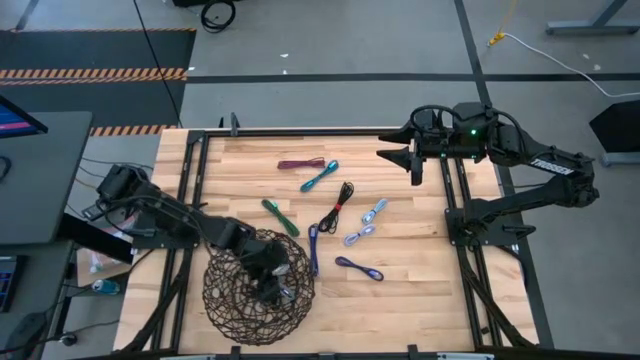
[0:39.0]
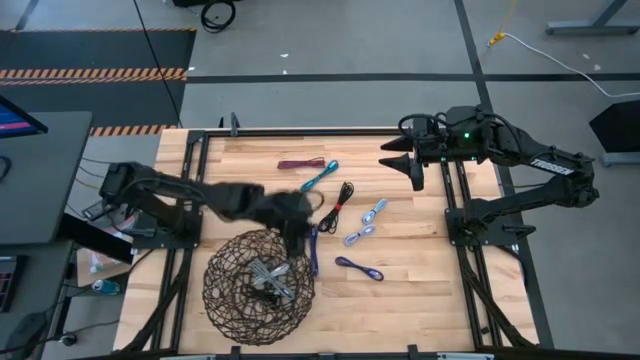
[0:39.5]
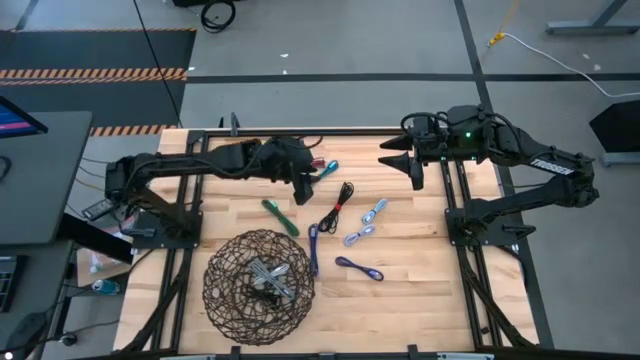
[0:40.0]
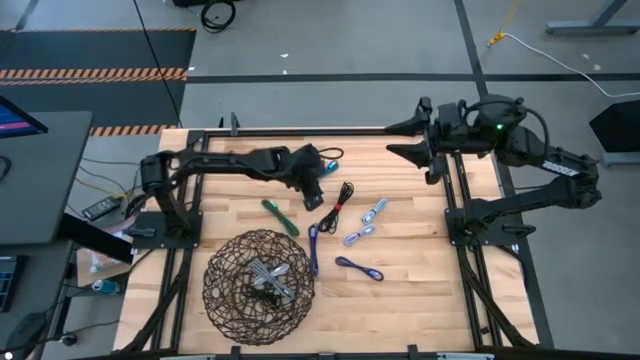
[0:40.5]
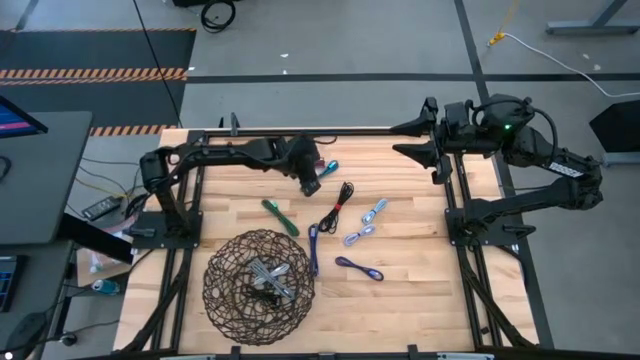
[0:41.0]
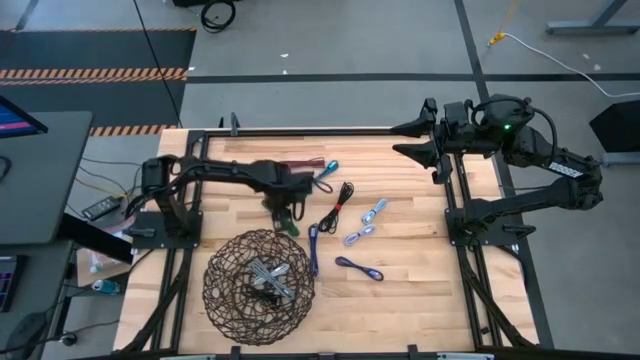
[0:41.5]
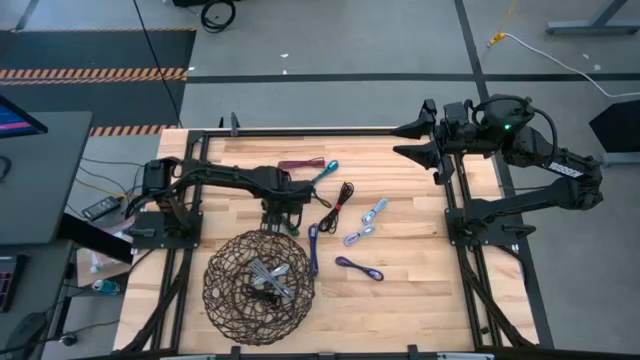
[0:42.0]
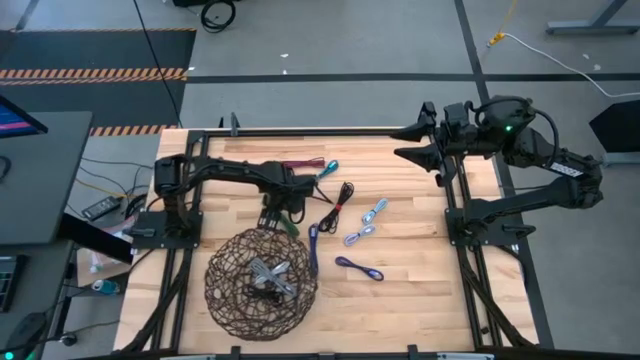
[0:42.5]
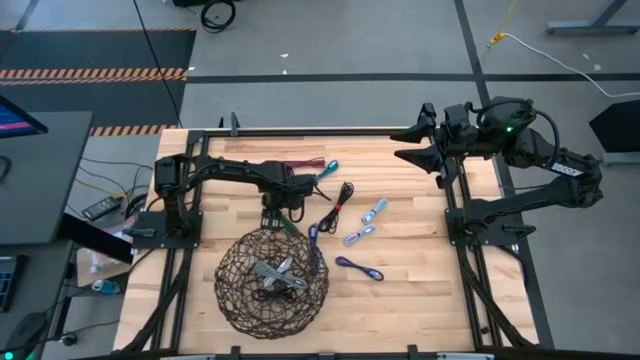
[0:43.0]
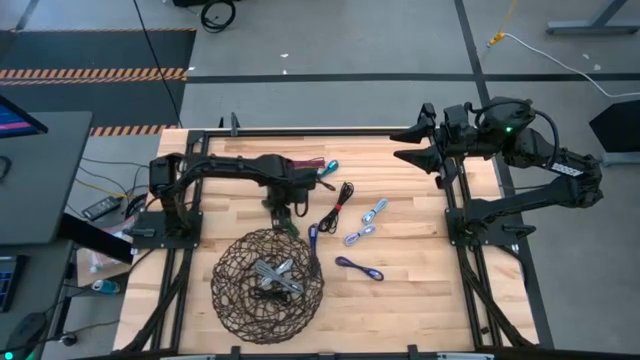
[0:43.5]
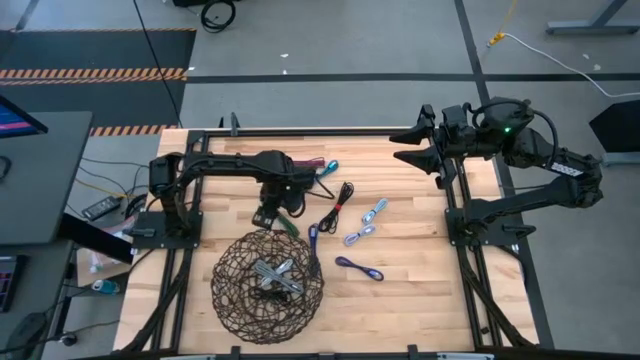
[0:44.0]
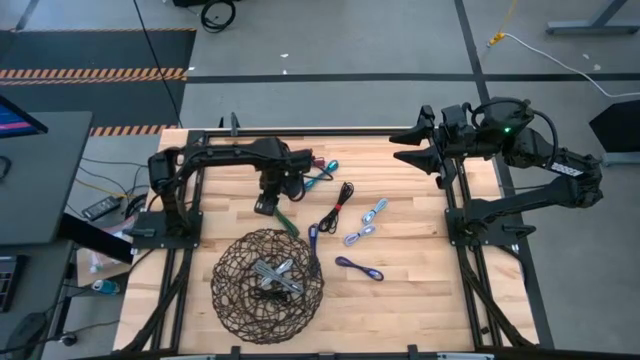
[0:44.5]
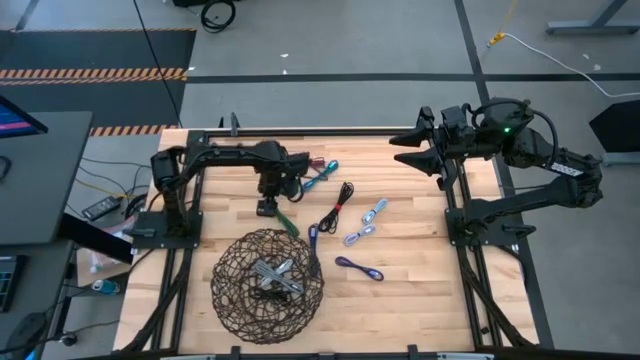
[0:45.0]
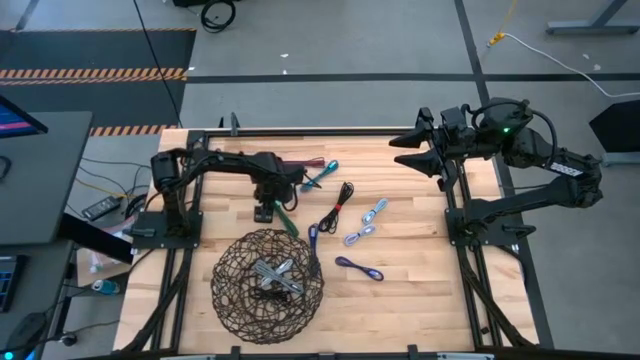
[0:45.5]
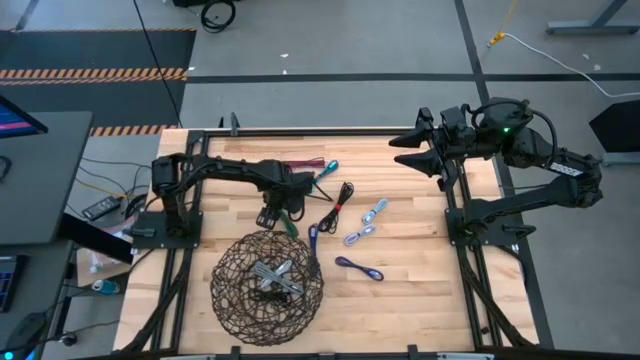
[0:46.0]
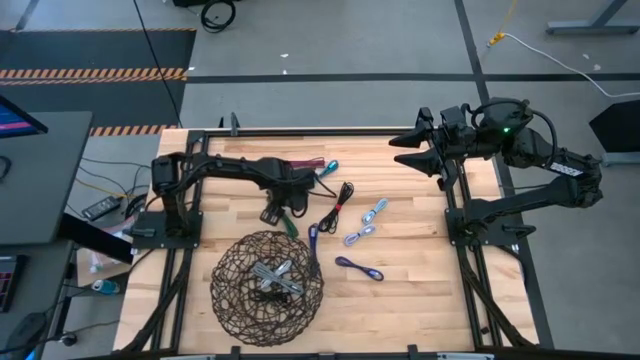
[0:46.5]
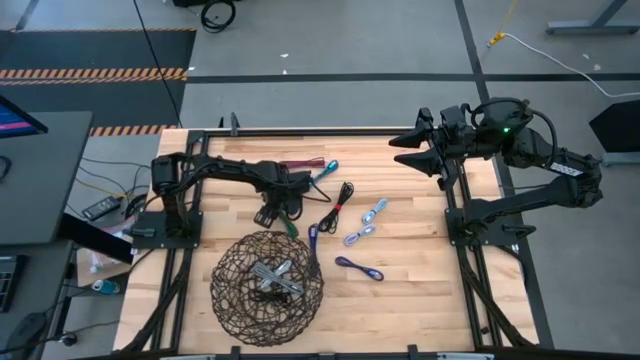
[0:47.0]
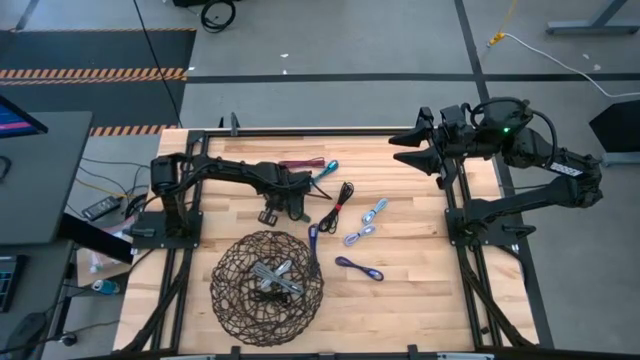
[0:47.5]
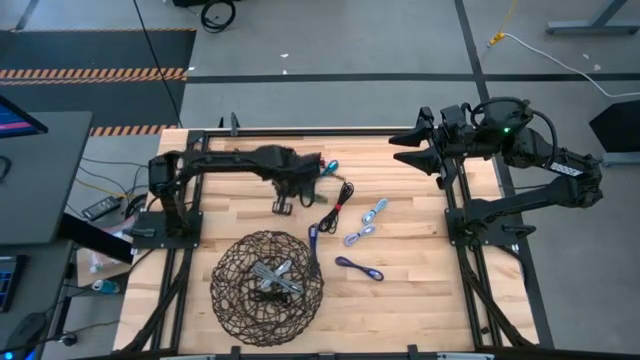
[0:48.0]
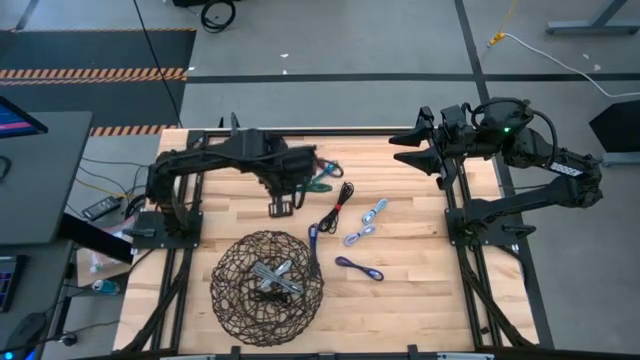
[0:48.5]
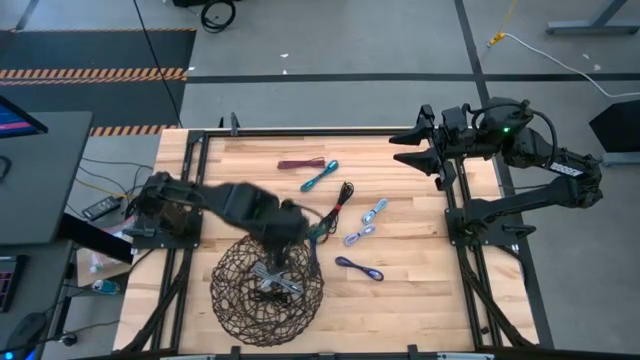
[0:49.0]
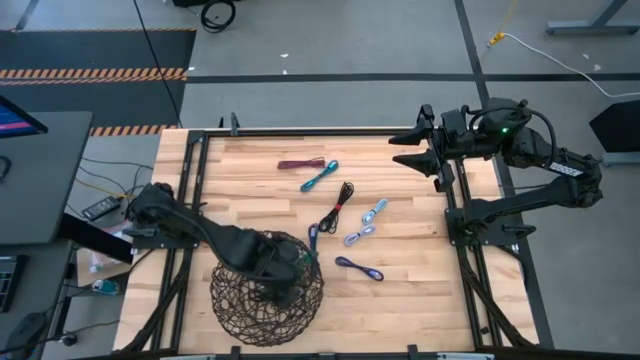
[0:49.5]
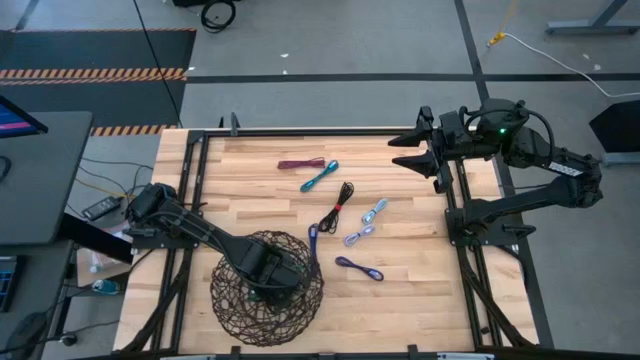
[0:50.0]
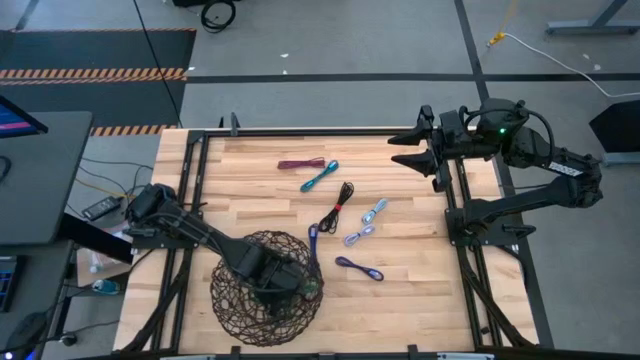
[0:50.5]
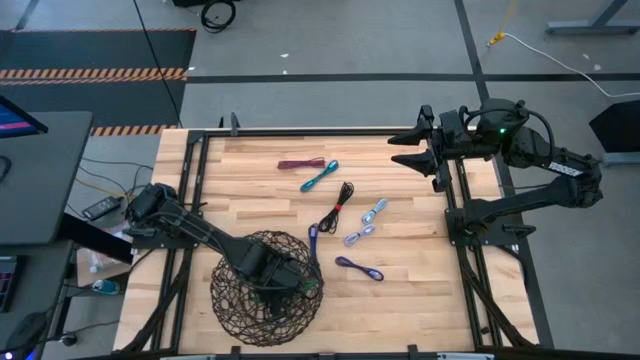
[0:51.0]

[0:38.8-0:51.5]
Task: Pick and place USB-C Cables
Put the green charger cable into the wire basket

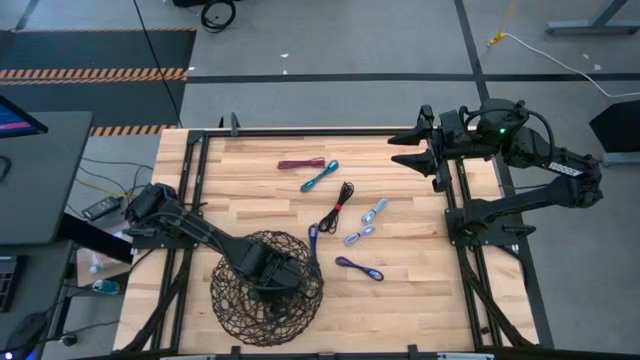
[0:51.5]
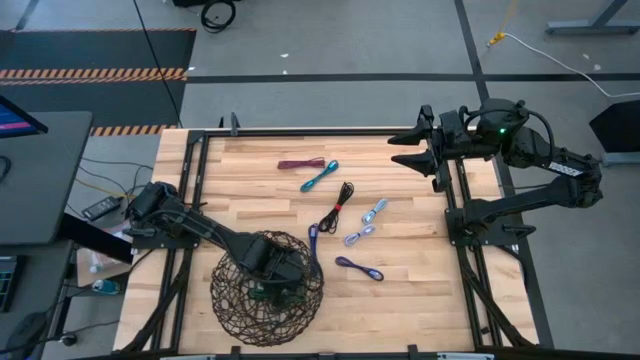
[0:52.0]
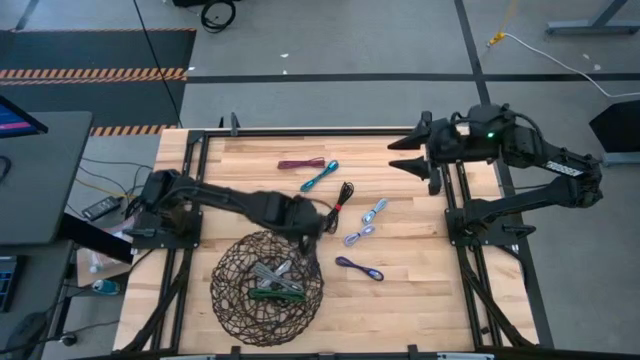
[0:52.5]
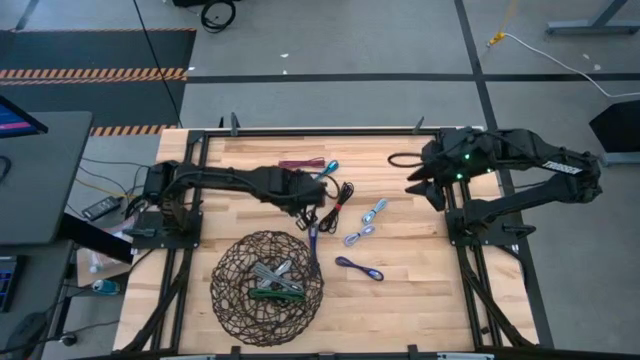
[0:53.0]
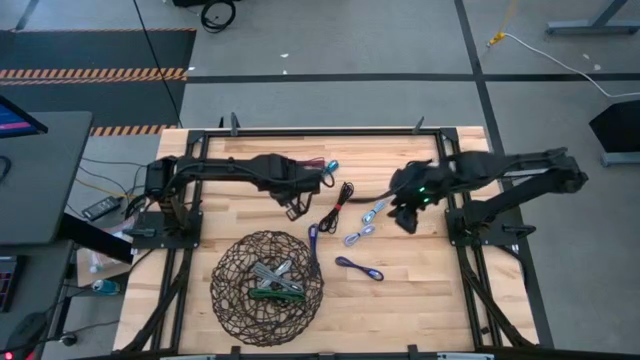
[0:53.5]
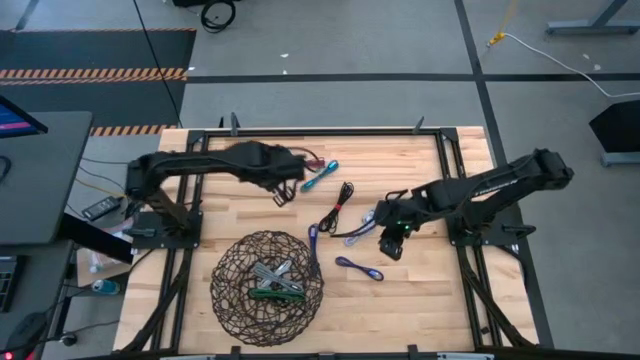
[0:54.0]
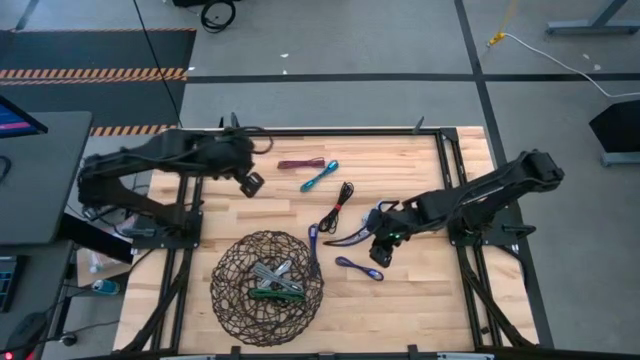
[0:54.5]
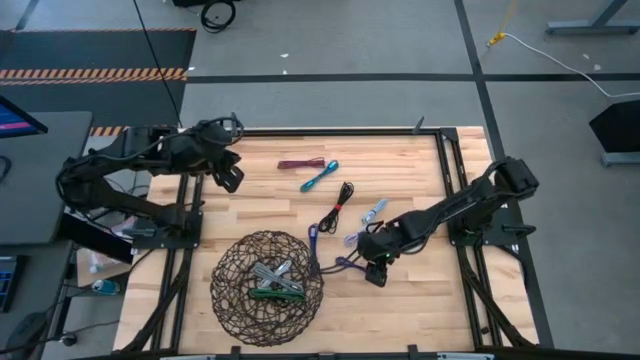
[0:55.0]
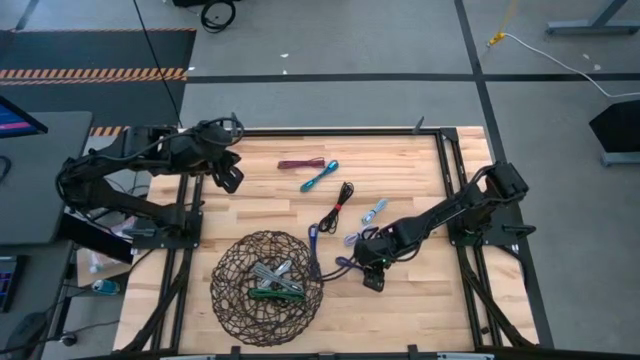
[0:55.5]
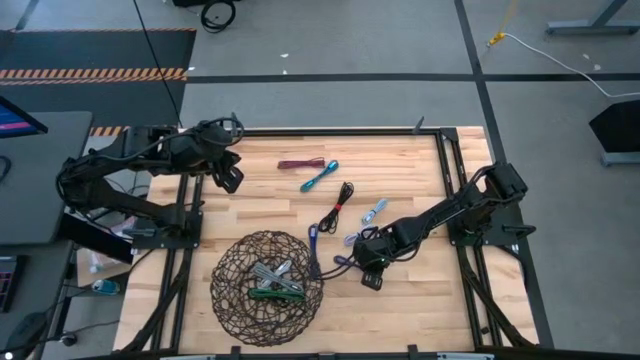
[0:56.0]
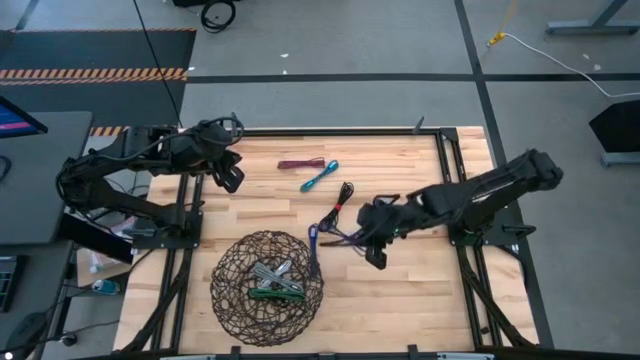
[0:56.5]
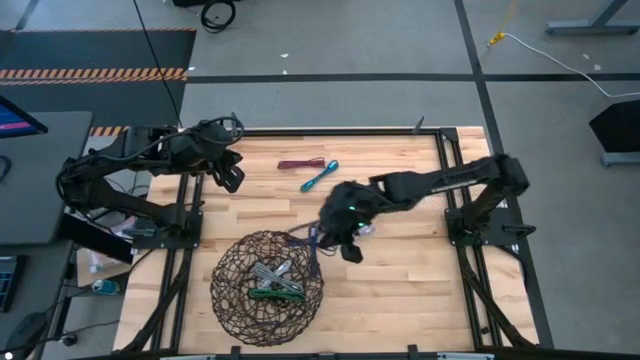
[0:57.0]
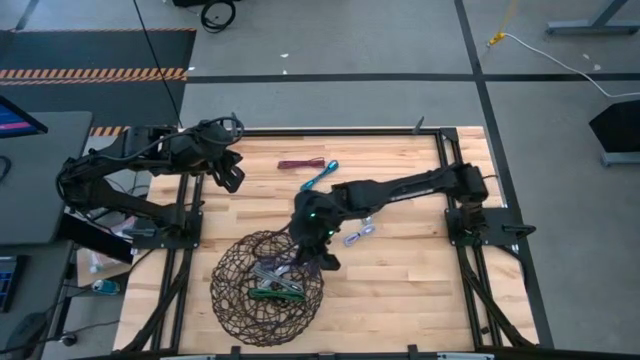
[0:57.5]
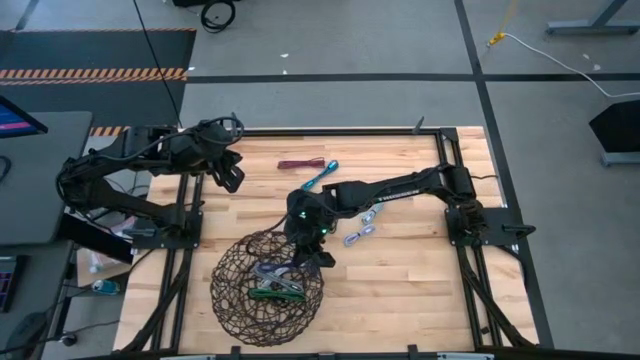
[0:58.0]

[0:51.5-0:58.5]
Put the right violet charger cable into the wire basket

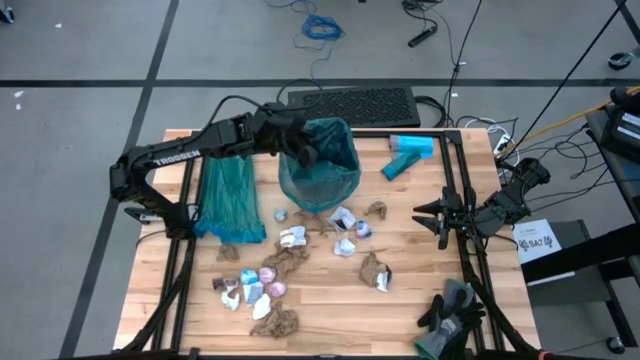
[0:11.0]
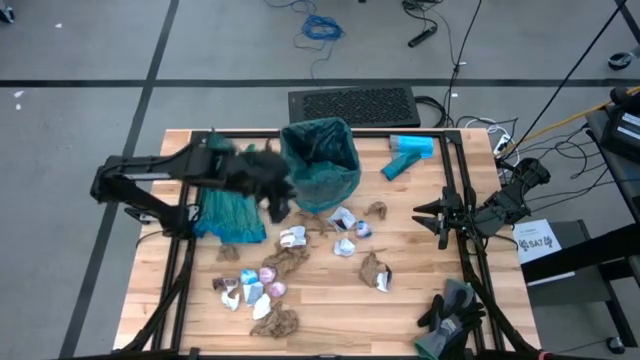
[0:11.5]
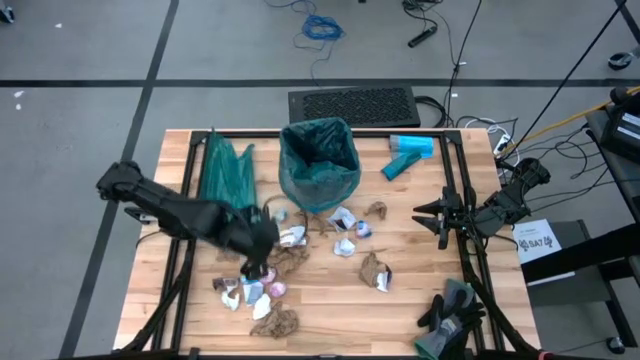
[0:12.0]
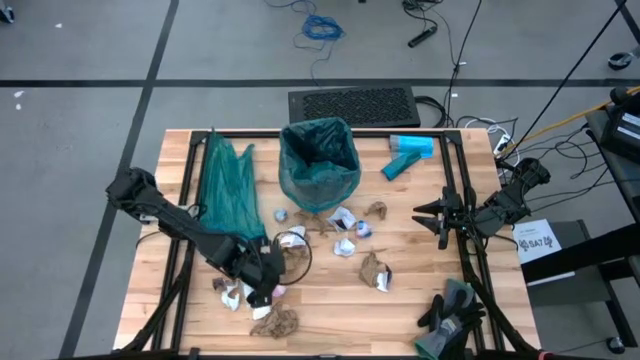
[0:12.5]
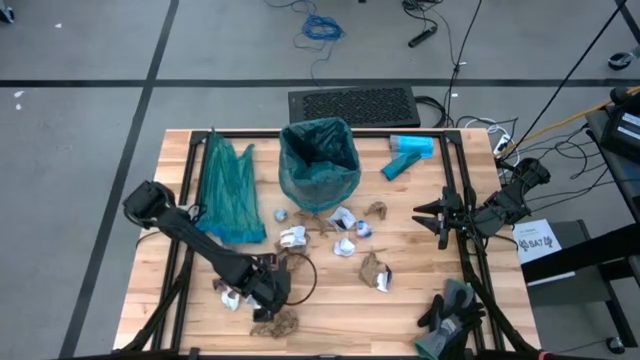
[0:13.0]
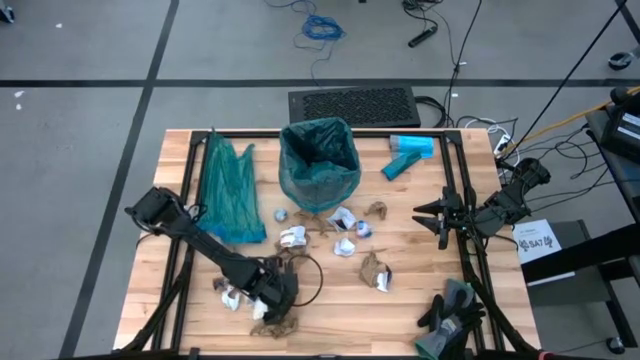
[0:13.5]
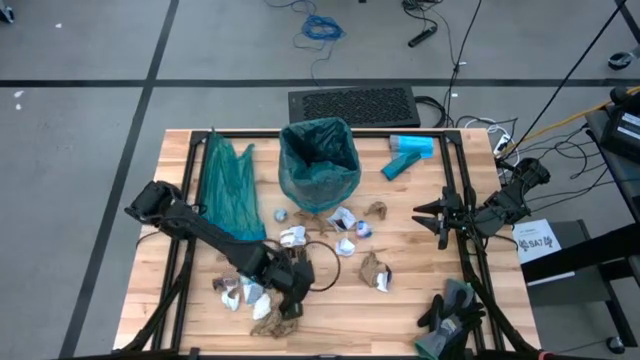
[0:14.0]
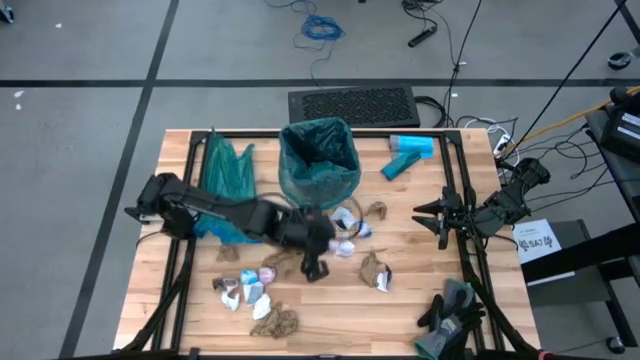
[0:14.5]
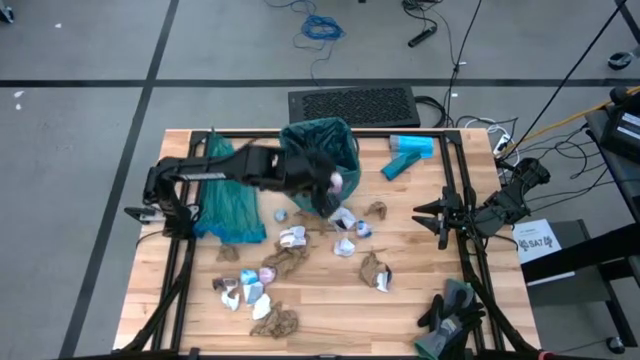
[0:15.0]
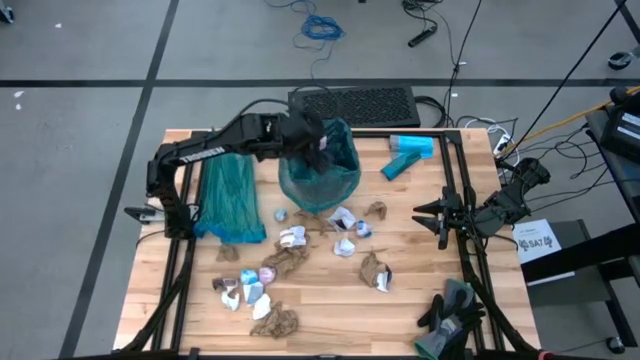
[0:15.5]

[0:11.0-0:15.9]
Task: place trash/remove bag and relplace
Put the pink plastic into the blue trash bag inside the black trash bin
